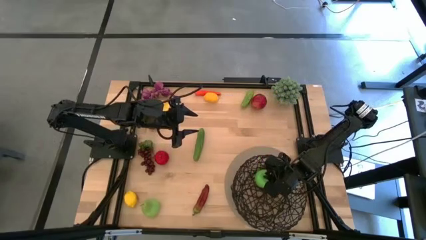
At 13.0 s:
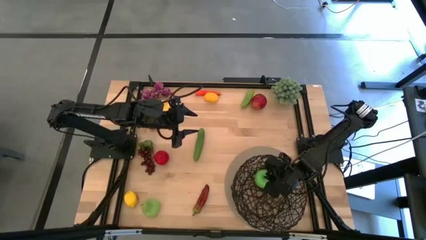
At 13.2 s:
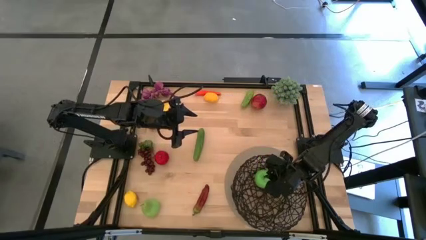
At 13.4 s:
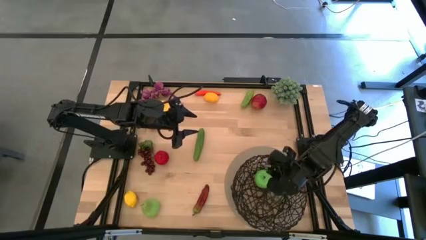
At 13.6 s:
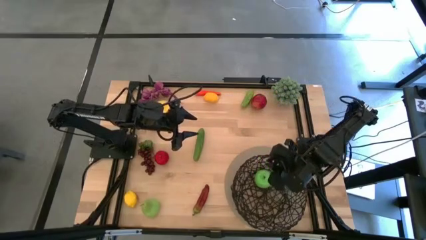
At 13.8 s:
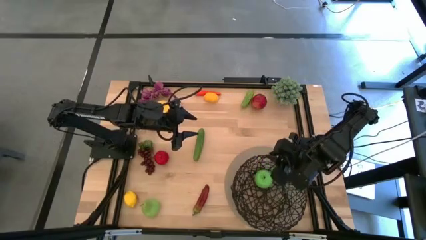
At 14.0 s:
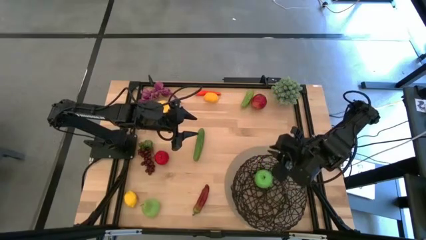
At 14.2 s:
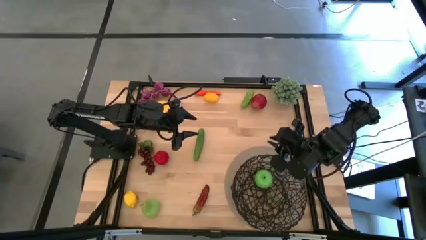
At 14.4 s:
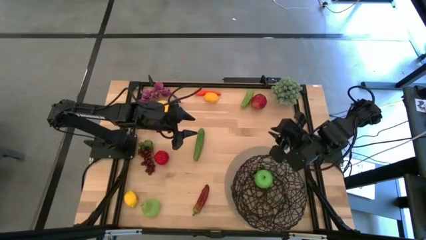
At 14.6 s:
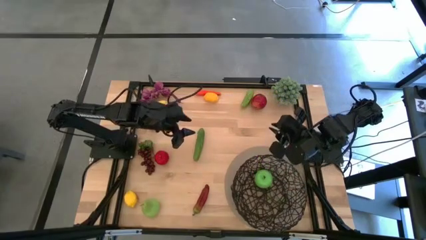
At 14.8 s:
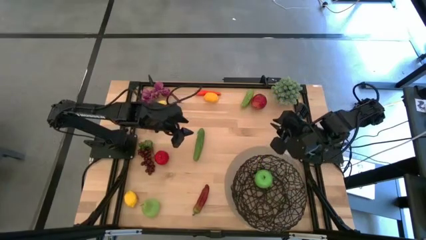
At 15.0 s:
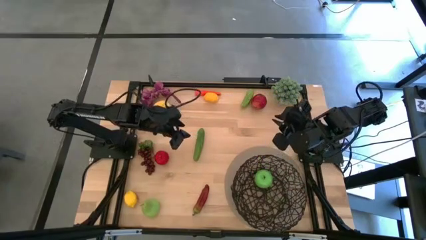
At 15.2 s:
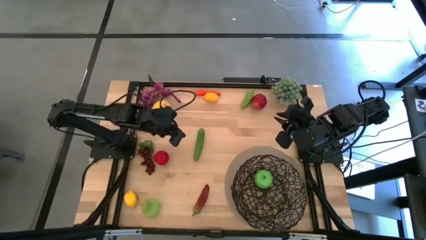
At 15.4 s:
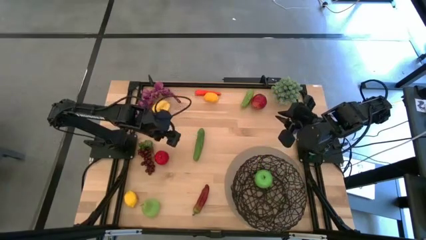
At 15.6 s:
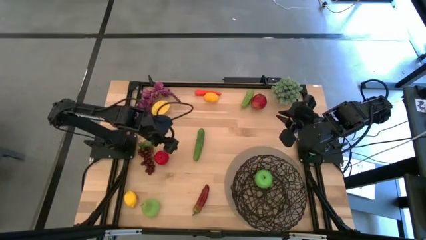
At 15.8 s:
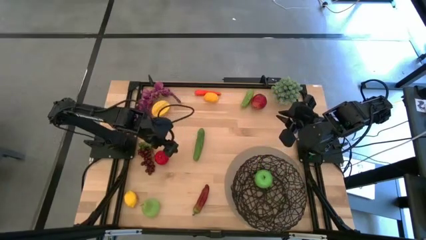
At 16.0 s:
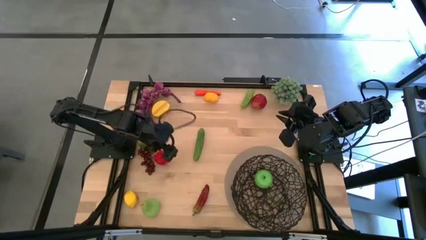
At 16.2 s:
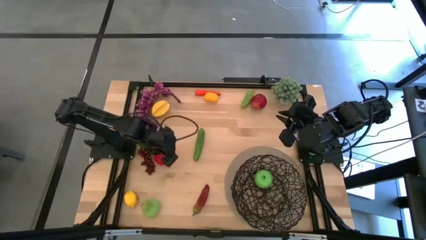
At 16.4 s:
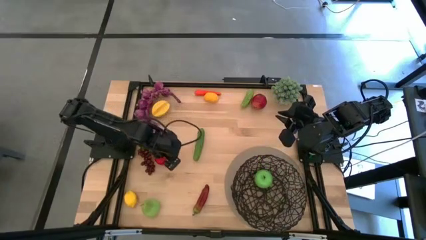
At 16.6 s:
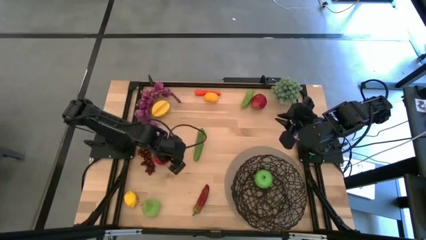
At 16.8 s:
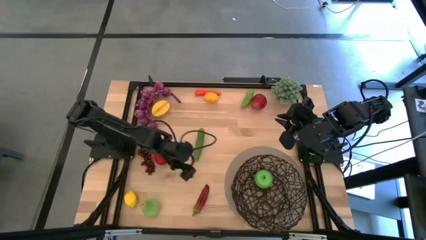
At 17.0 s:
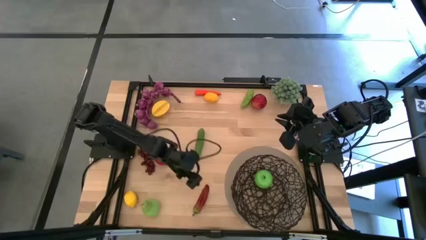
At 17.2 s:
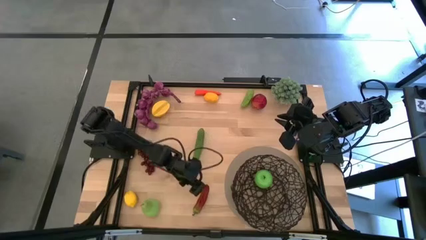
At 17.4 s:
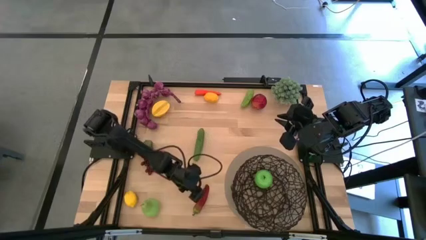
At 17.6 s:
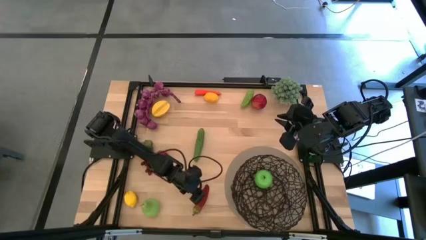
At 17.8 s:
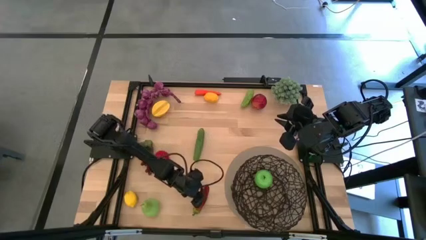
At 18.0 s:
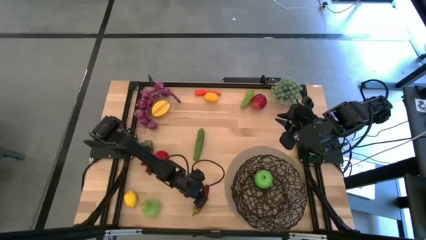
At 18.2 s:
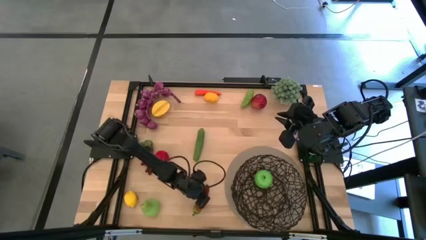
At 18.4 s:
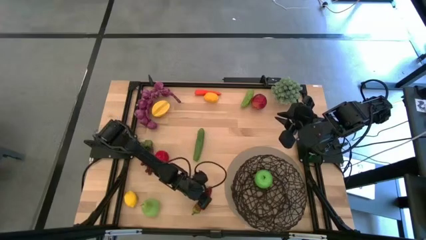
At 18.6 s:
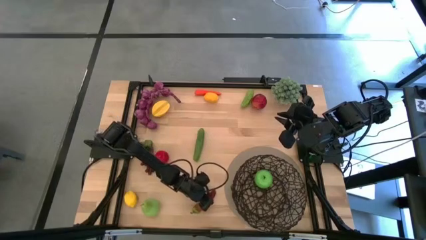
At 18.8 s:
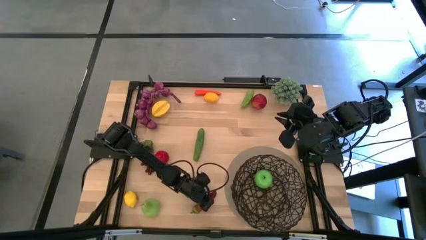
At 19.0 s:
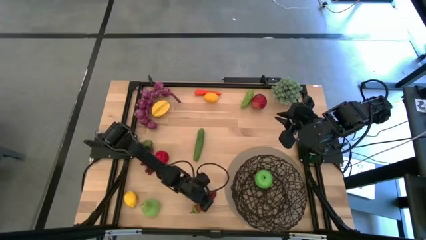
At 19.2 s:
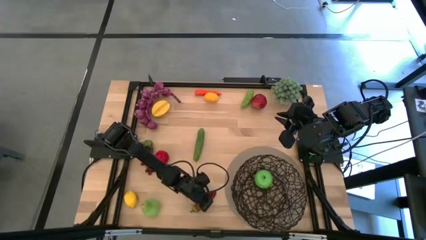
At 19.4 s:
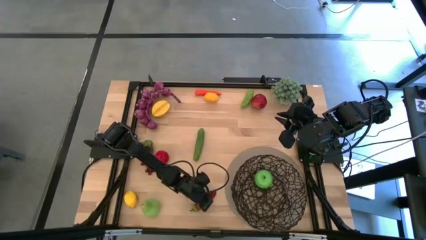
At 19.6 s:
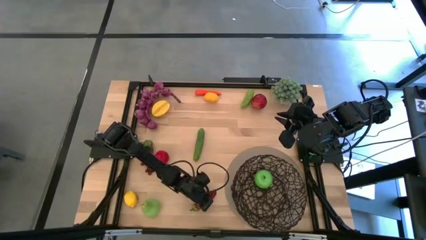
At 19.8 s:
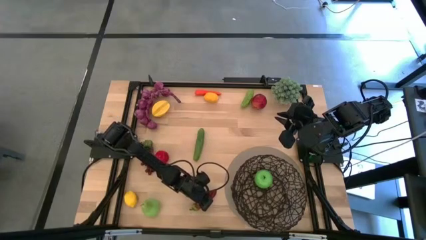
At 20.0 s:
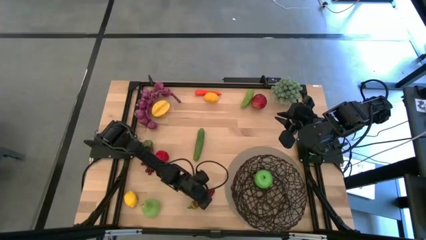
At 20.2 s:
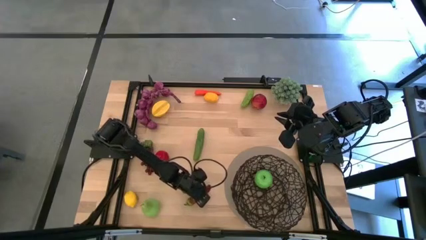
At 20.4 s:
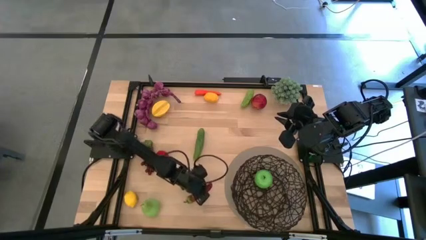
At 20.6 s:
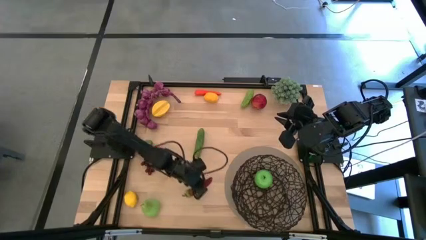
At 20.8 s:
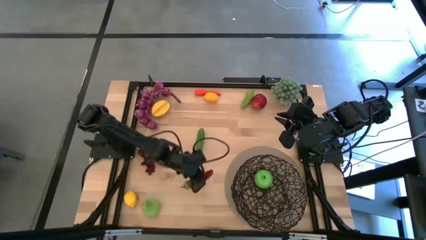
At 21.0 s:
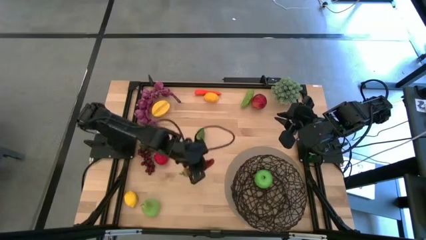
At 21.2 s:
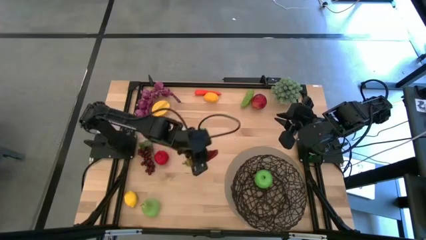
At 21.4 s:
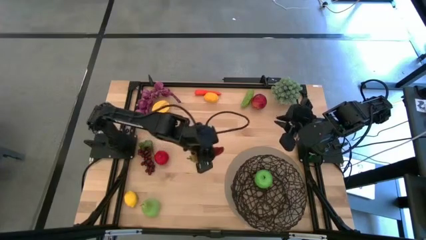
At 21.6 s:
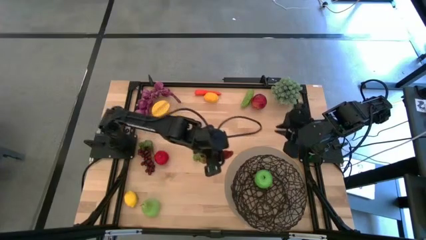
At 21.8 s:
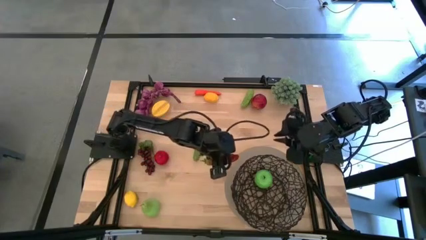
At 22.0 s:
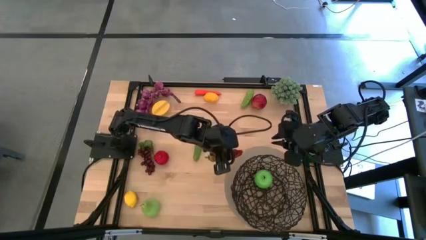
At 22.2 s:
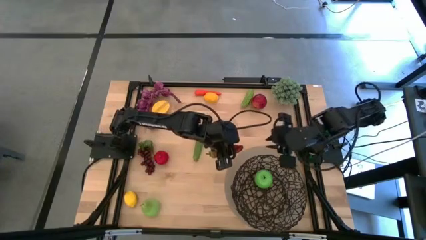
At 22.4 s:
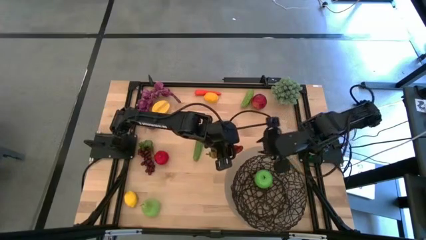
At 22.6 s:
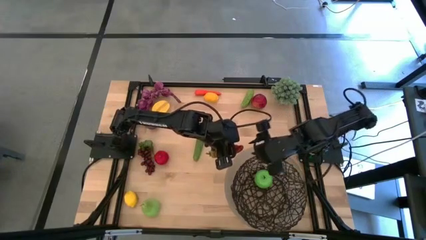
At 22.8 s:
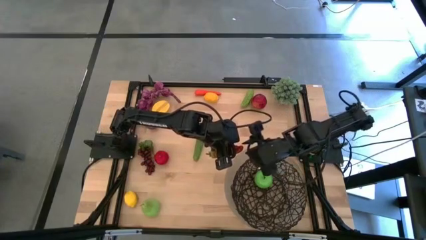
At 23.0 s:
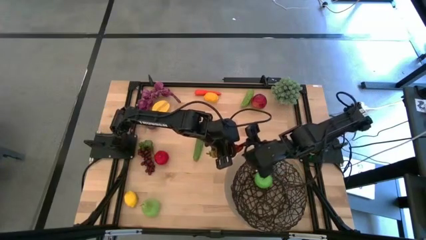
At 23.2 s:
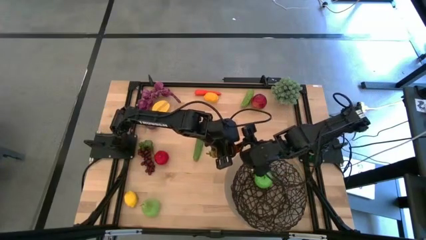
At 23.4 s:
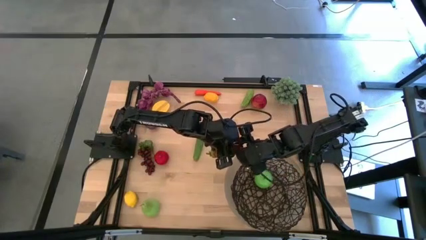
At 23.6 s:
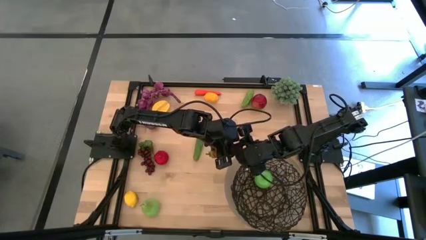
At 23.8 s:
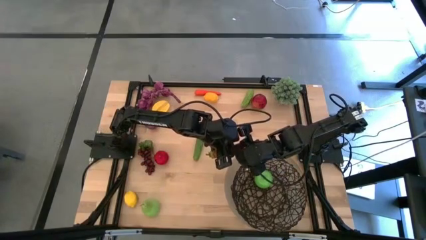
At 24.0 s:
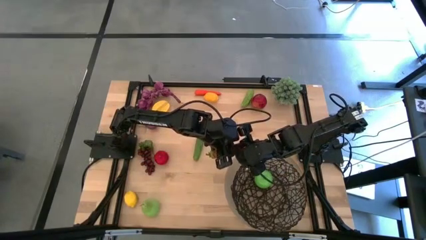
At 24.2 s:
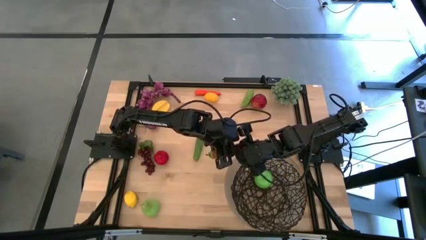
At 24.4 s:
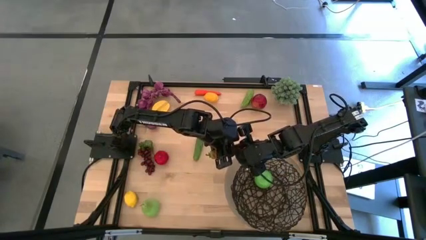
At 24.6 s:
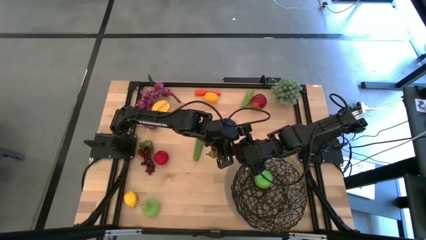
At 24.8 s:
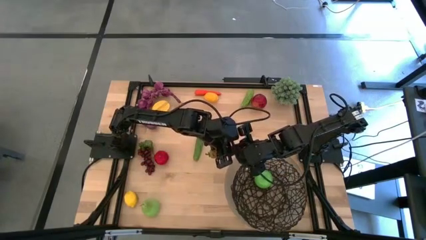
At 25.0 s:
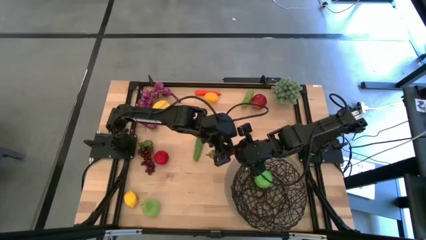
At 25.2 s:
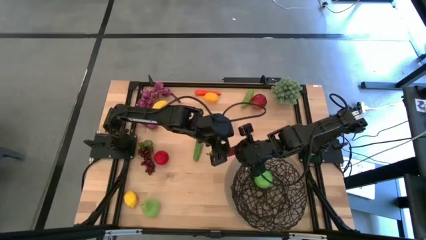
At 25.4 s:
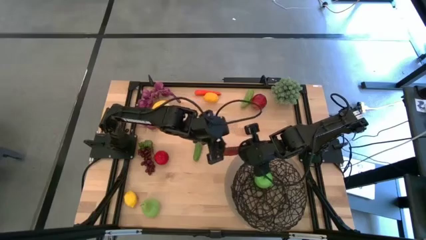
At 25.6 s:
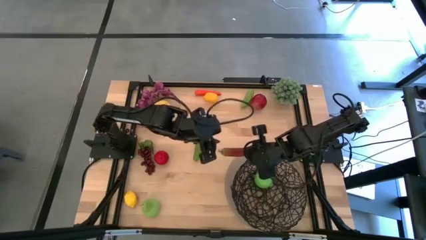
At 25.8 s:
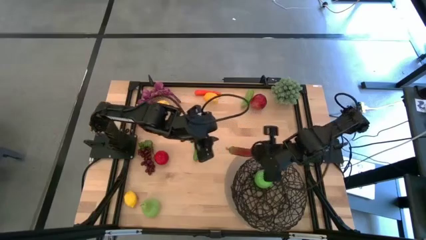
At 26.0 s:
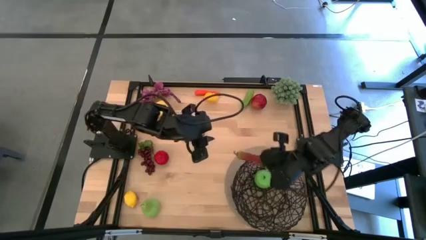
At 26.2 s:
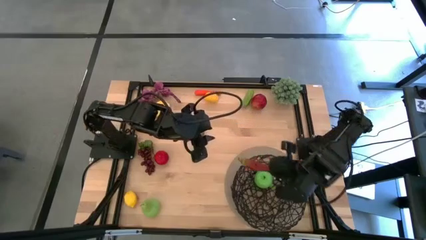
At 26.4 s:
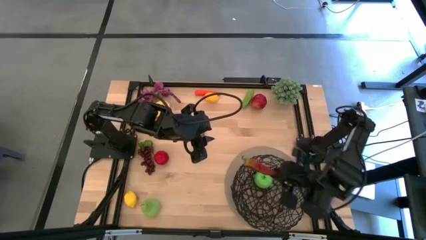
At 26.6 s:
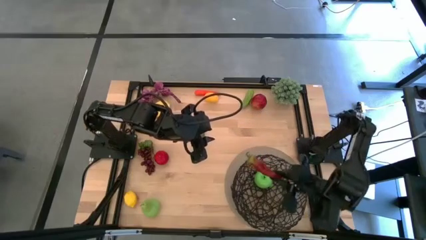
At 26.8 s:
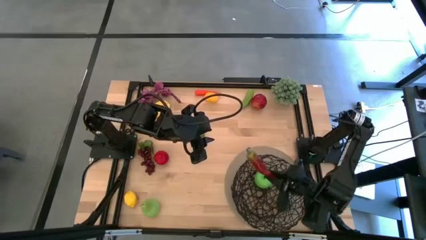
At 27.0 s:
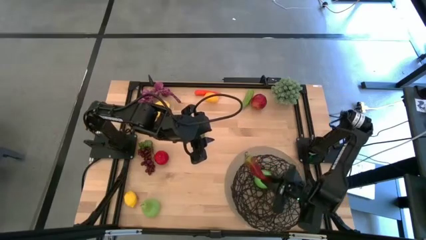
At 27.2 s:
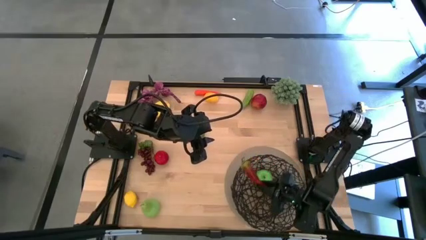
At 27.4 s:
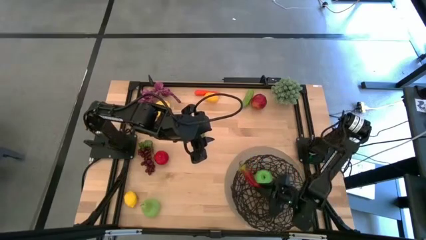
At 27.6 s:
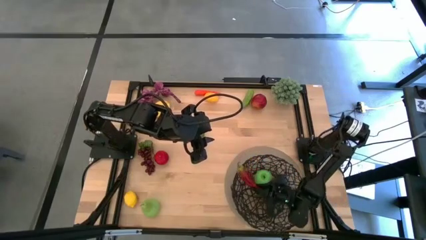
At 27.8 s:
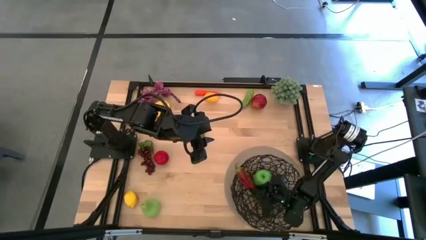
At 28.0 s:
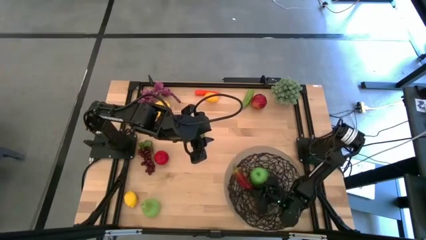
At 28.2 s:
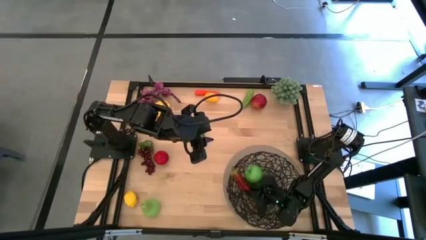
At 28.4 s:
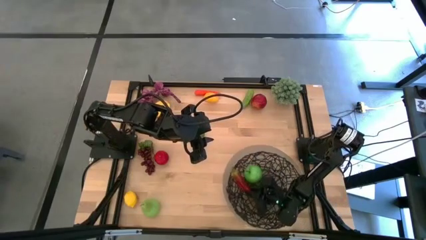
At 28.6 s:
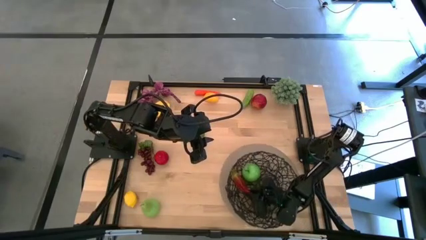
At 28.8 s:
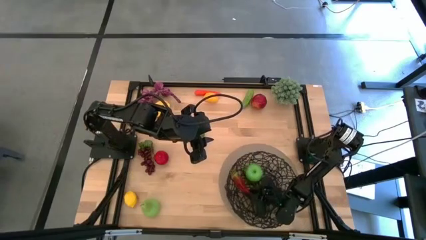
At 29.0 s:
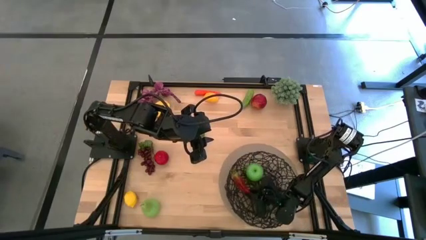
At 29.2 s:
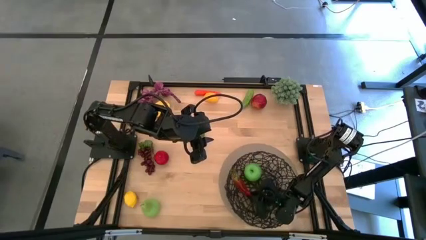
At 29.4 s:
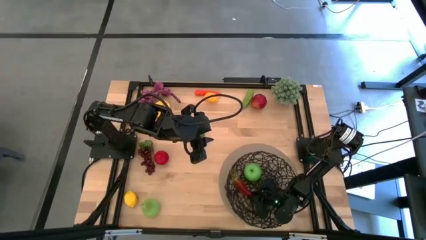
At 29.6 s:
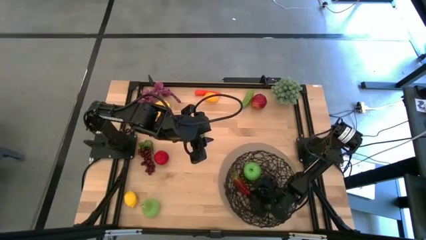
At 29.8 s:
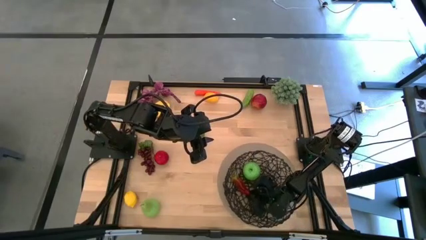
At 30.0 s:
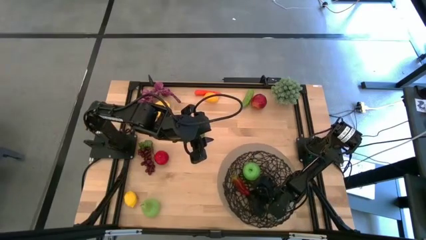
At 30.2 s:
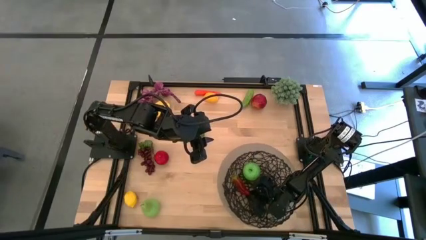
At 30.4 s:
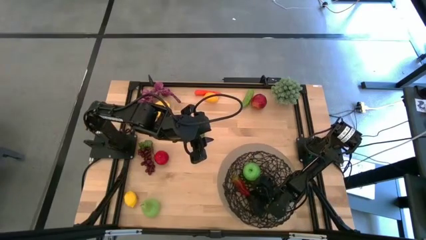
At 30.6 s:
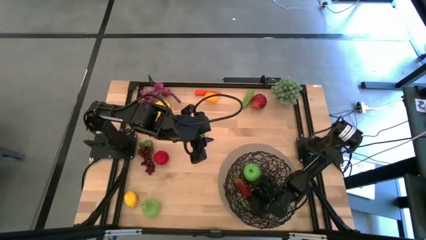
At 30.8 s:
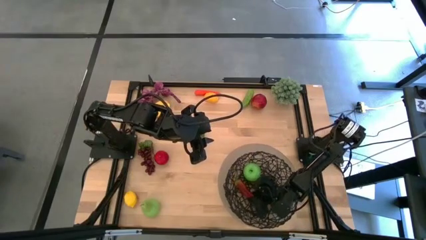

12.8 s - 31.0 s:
Task: Build produce basket
Put the red chili pepper into the wire basket
